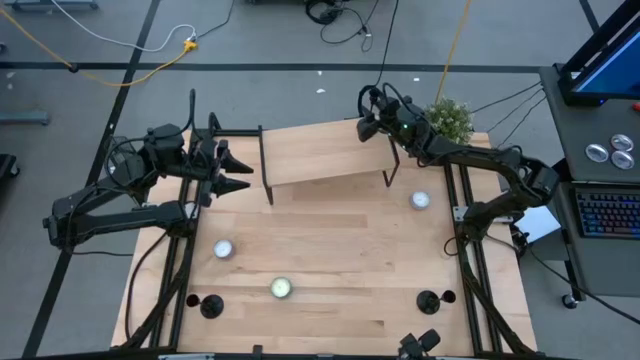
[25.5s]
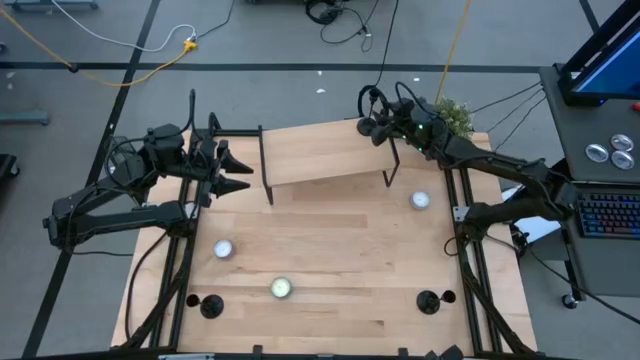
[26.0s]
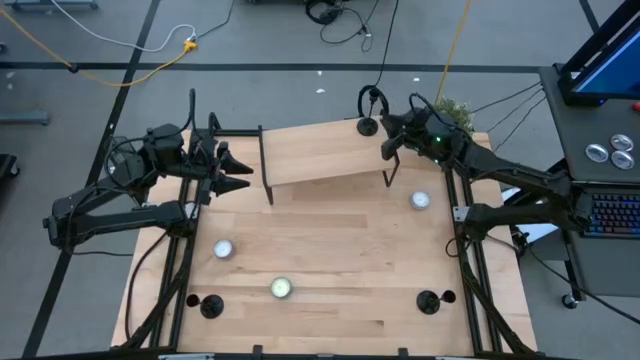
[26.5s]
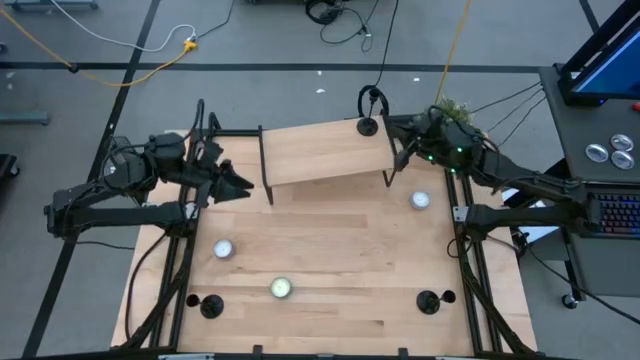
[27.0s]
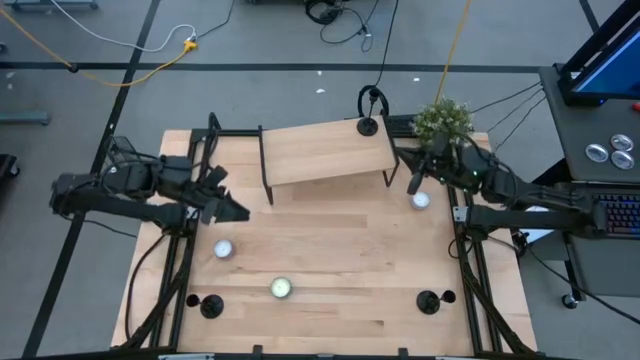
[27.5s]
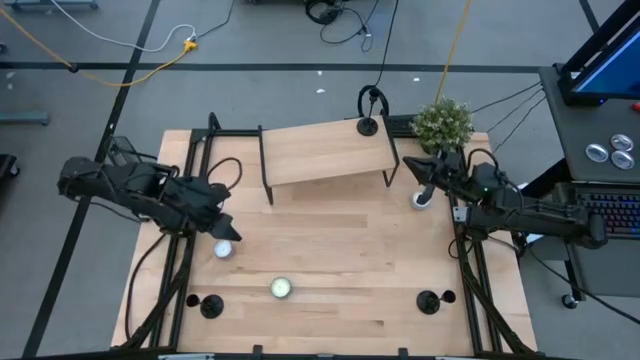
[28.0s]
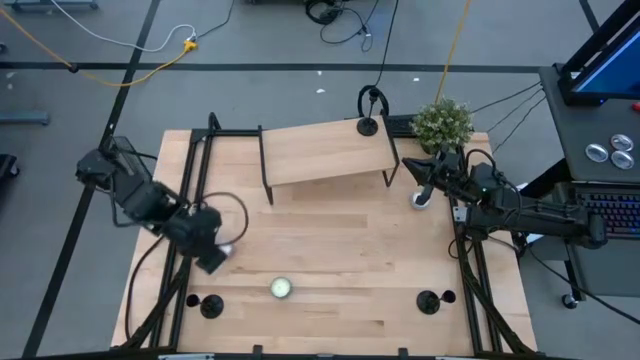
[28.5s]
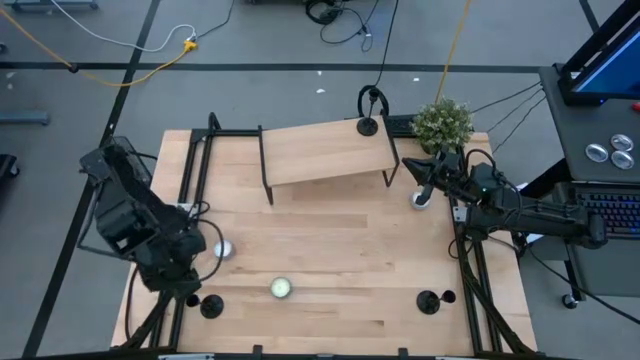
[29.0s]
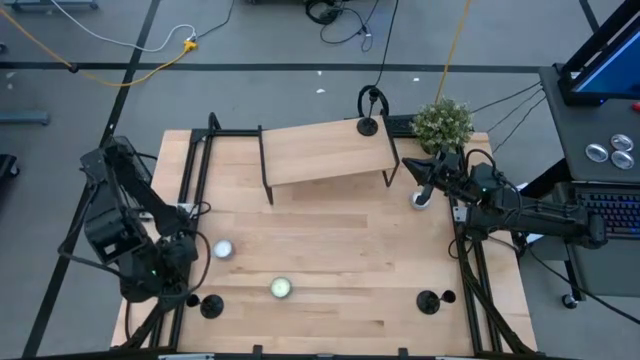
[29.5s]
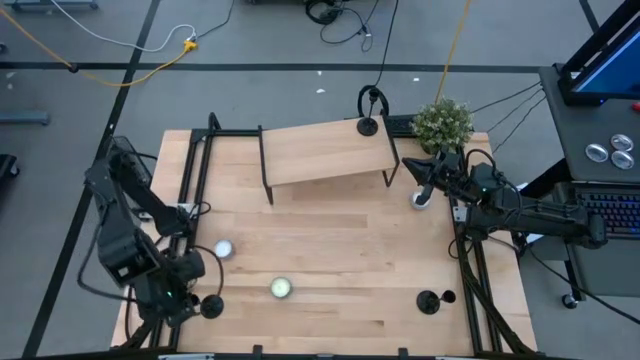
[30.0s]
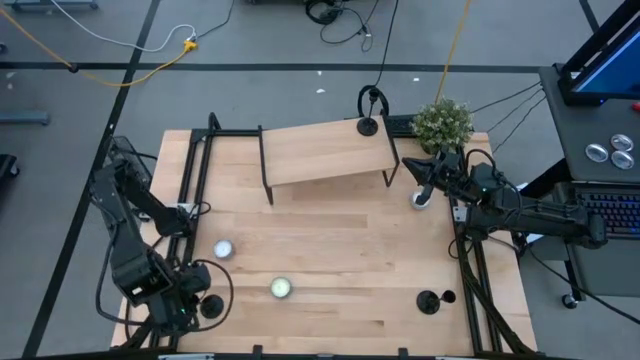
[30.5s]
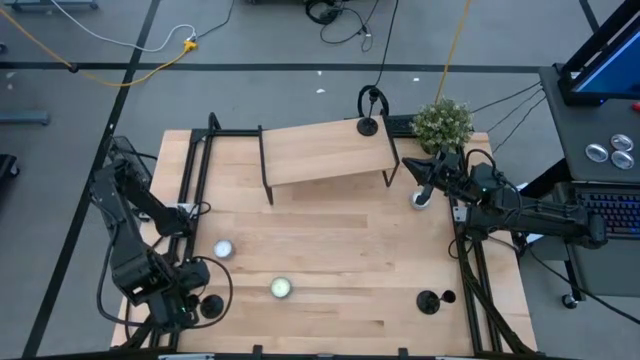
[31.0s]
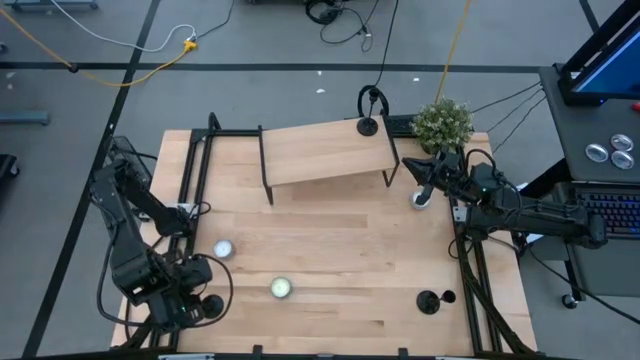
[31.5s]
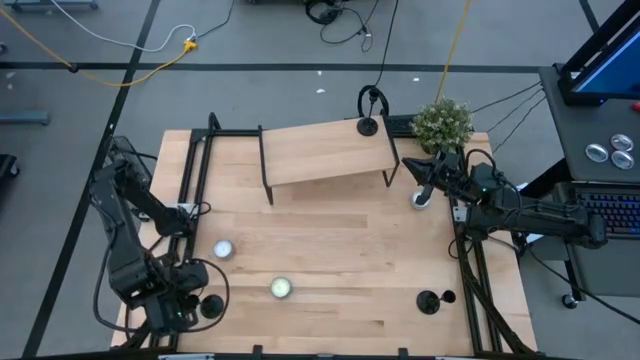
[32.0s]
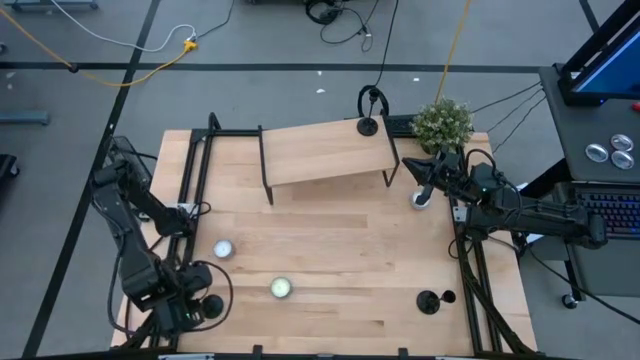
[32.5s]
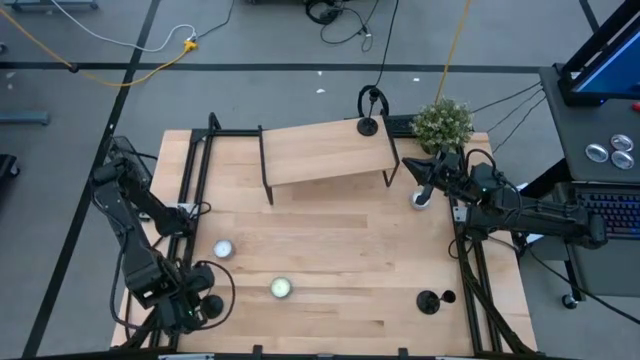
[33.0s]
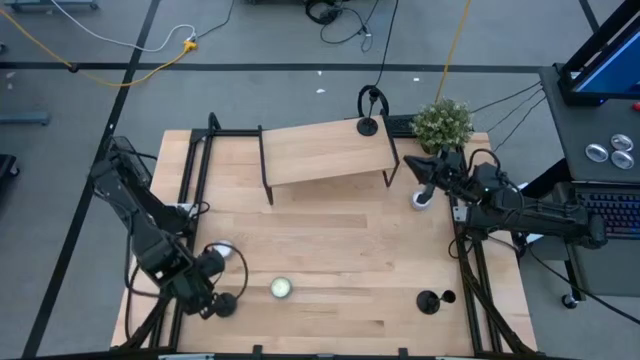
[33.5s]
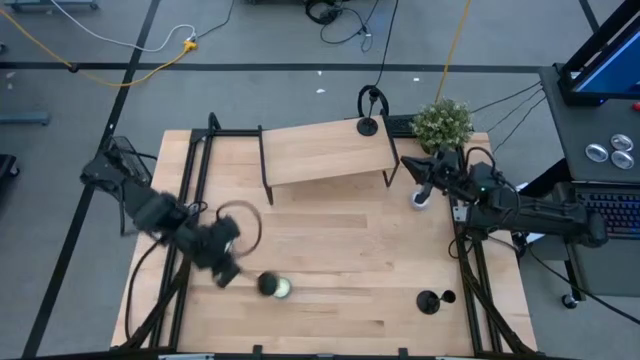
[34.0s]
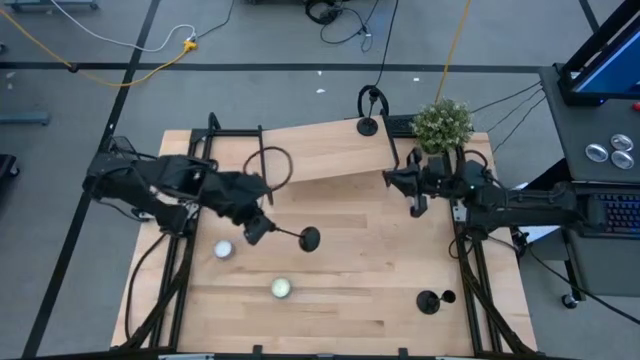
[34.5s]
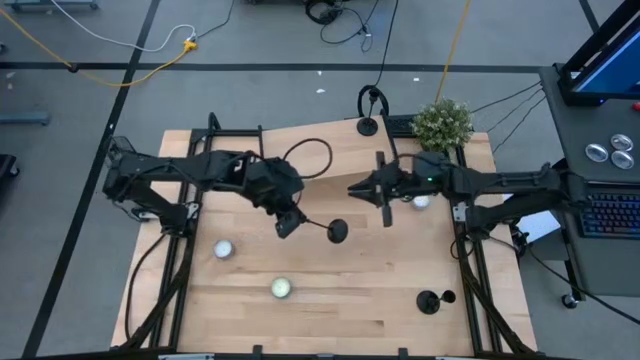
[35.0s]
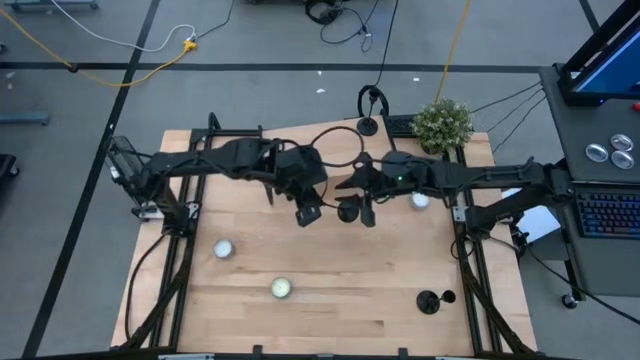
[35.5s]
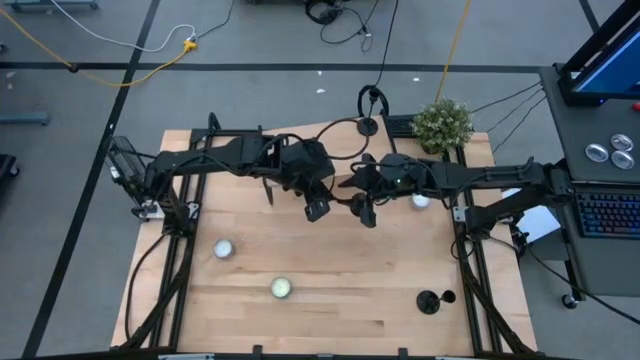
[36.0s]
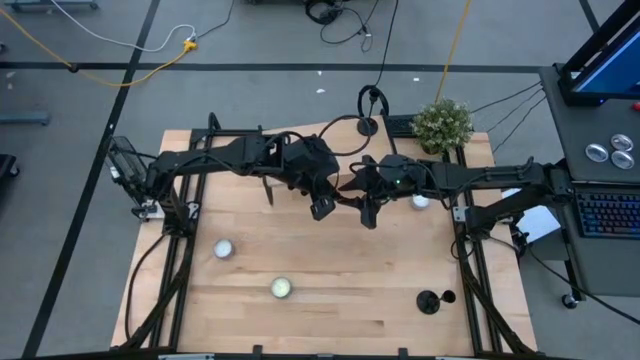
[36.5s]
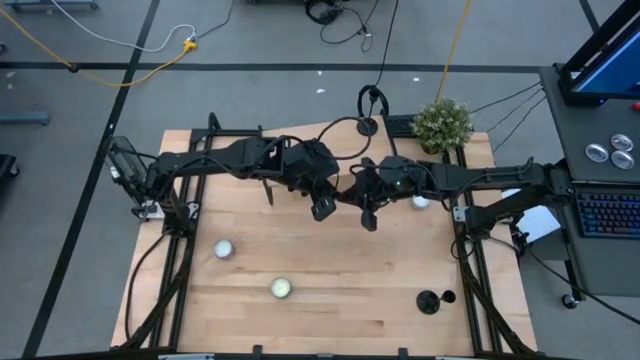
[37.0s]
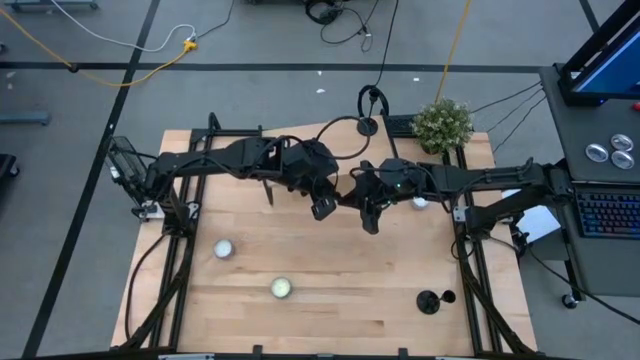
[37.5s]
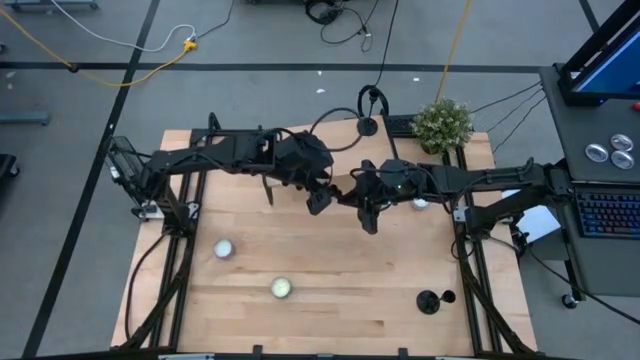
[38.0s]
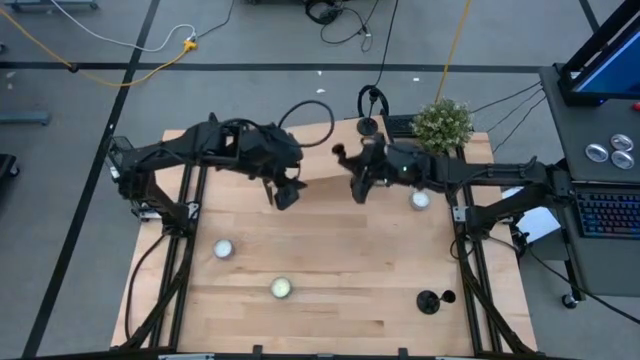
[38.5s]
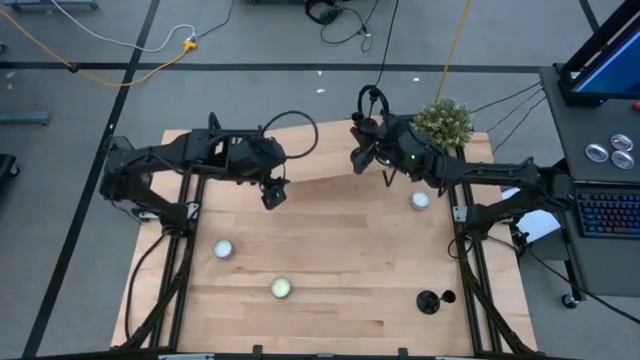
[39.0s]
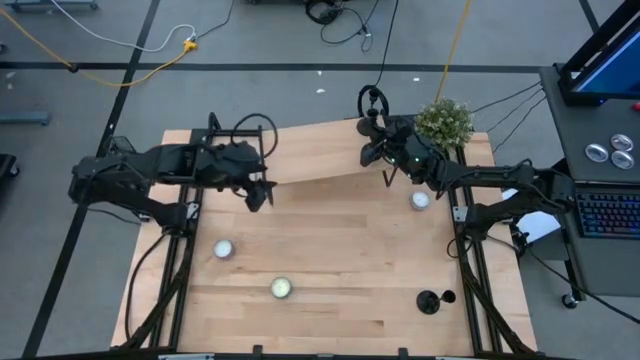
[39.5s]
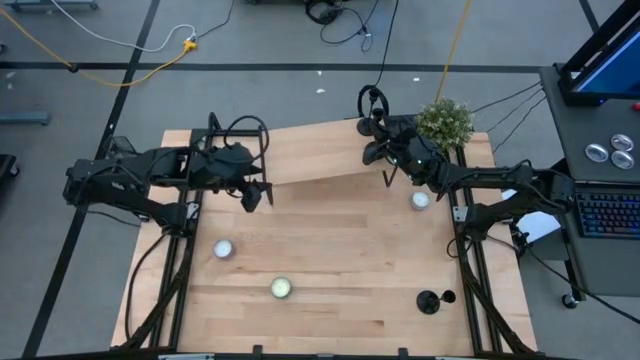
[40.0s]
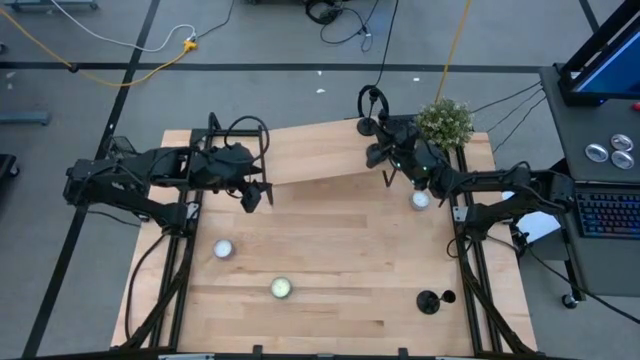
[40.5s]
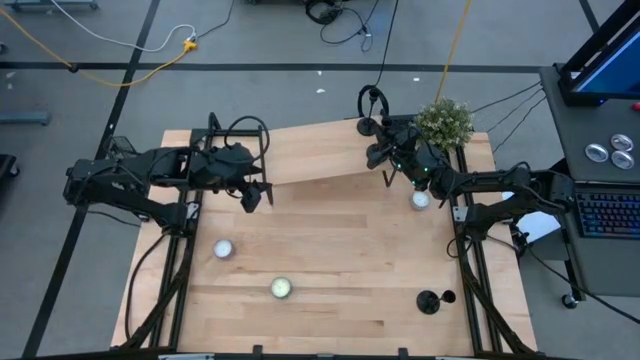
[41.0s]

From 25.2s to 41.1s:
Task: Pick & Place candle stick holders
Put the left black candle holder on the shelf

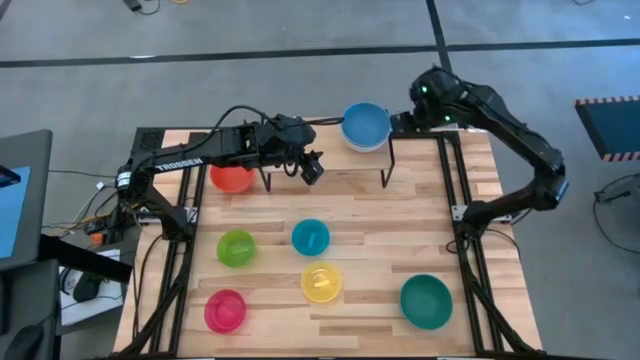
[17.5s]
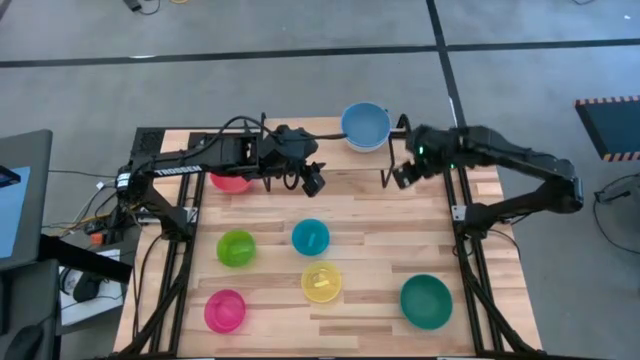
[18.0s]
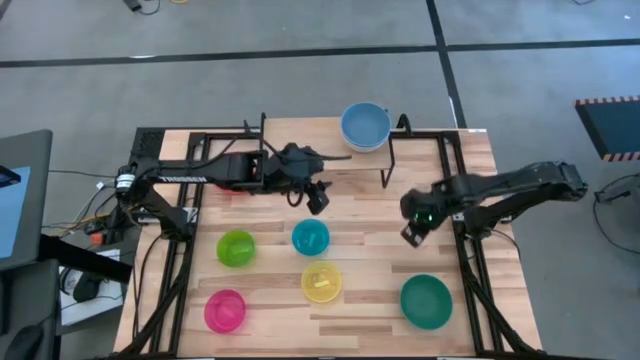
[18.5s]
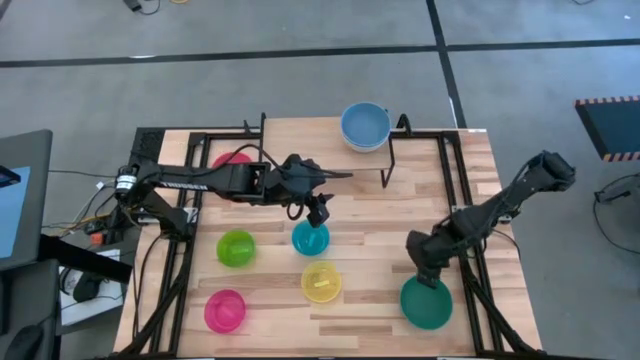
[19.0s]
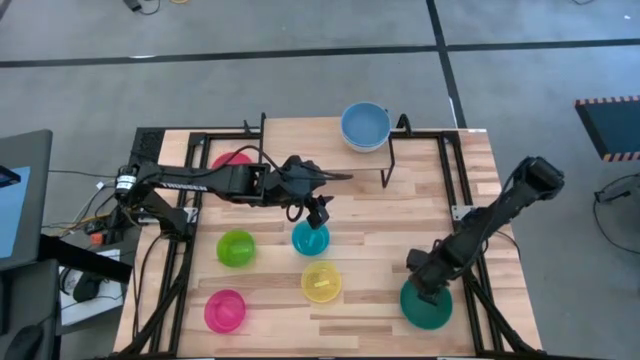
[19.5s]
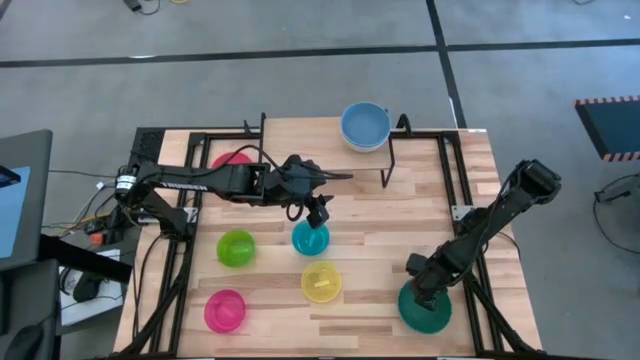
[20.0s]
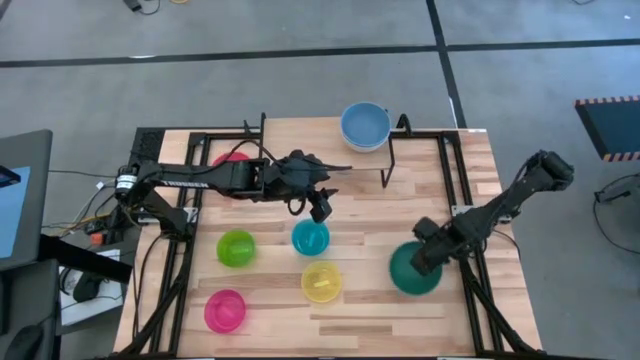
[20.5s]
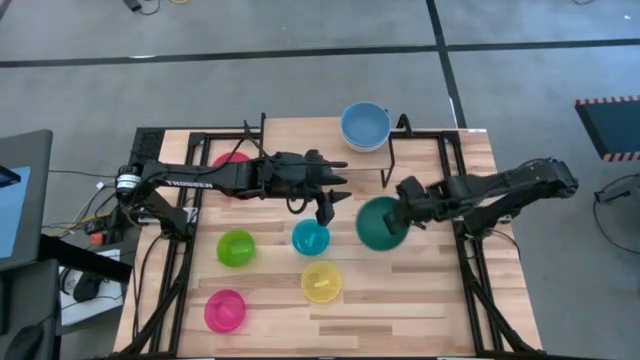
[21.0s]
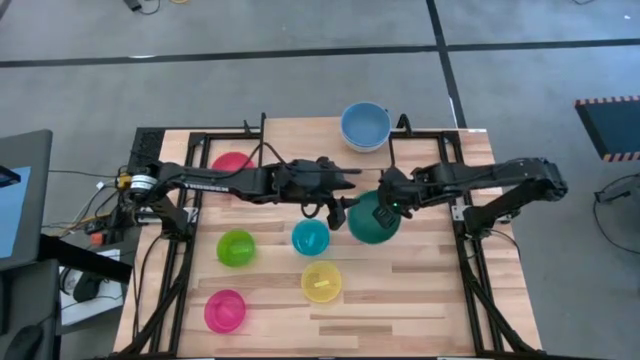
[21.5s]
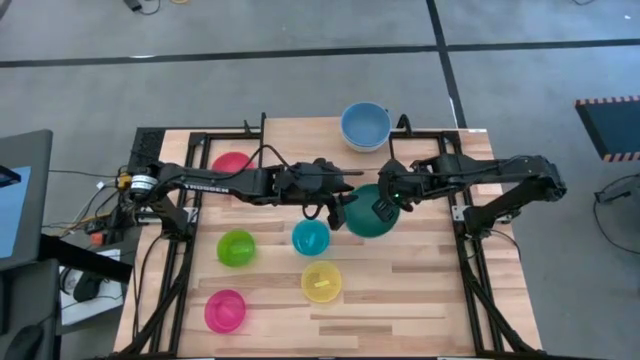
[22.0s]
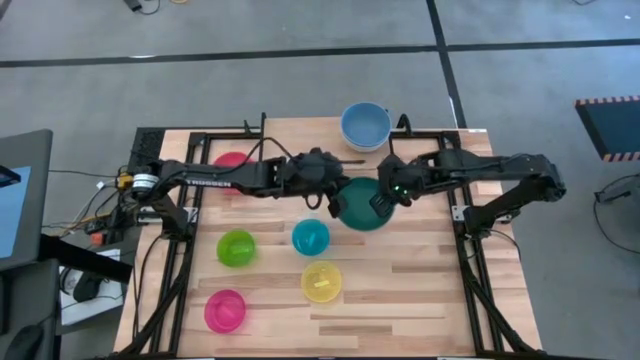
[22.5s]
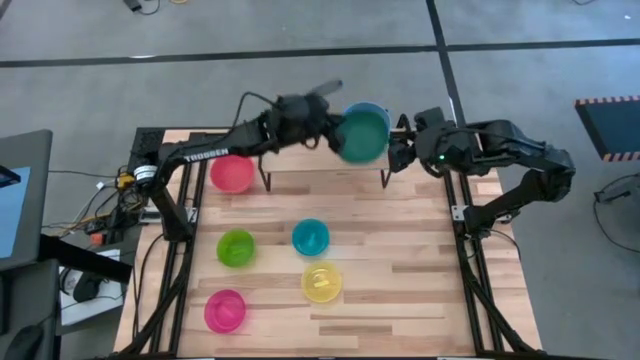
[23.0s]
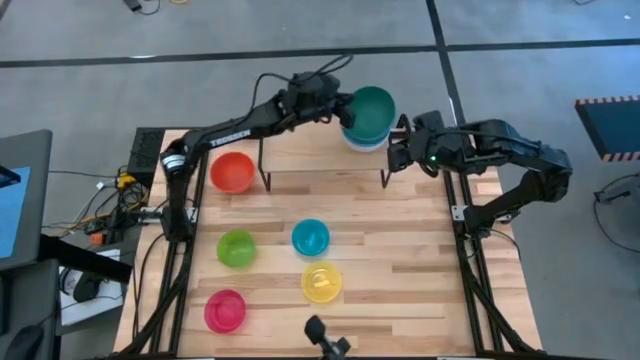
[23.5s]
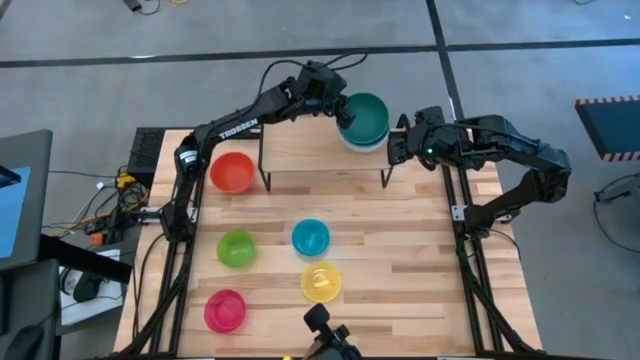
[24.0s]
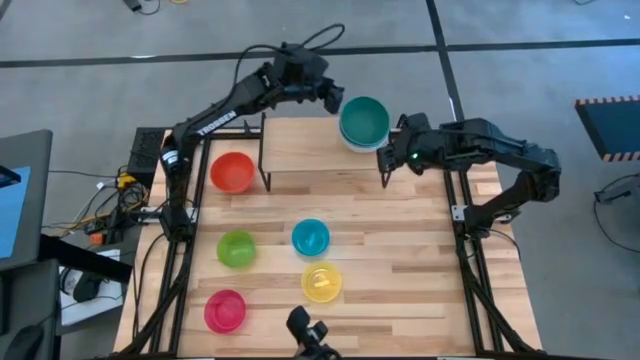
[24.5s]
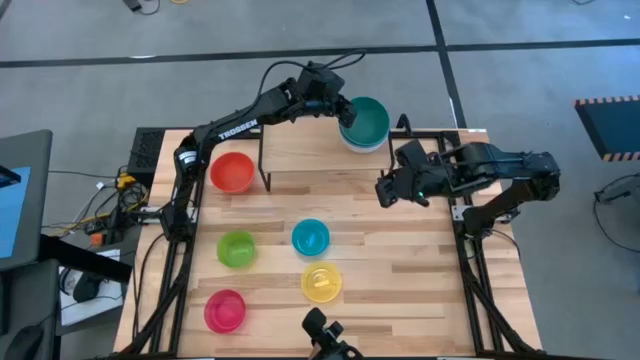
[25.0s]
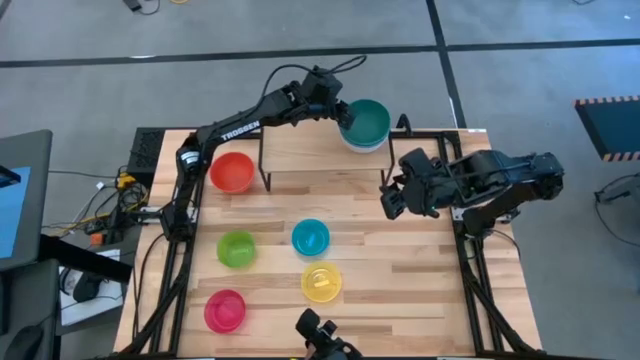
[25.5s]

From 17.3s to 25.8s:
Task: Place and stack bowls onto a shelf
Stack the large green bowl on top of the large blue bowl on the shelf
